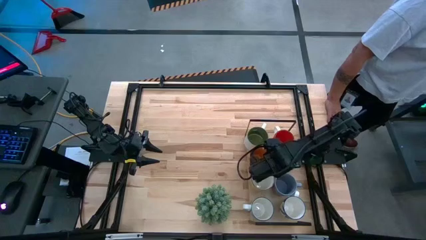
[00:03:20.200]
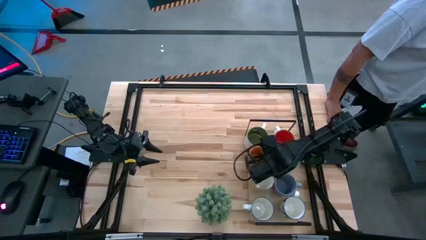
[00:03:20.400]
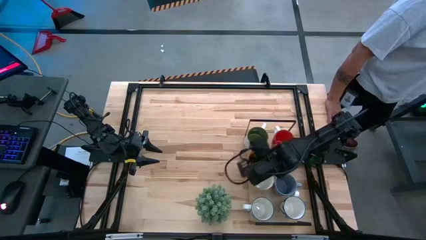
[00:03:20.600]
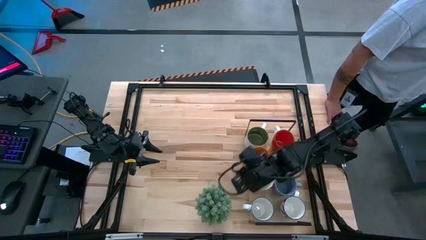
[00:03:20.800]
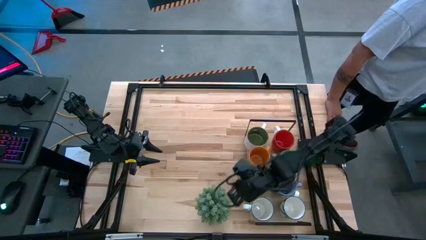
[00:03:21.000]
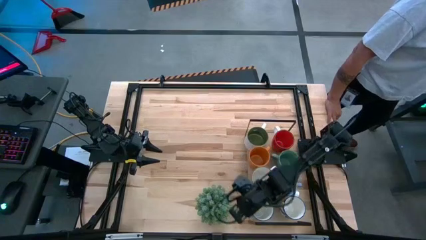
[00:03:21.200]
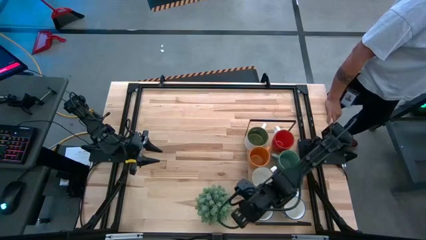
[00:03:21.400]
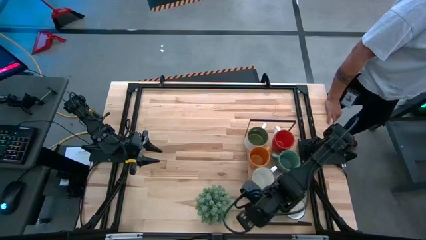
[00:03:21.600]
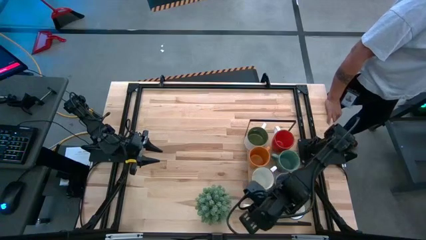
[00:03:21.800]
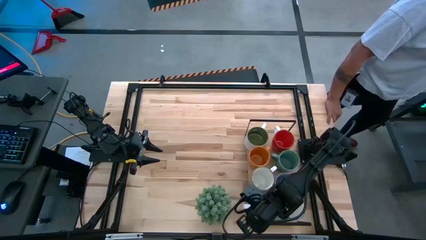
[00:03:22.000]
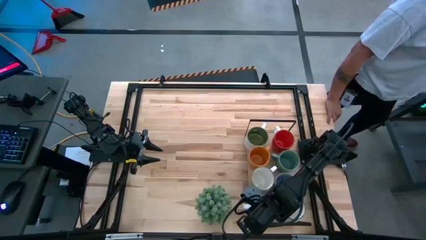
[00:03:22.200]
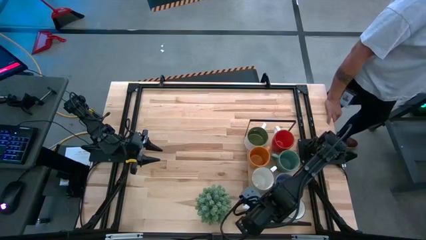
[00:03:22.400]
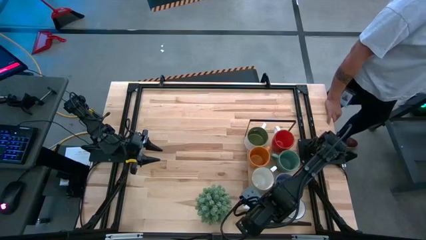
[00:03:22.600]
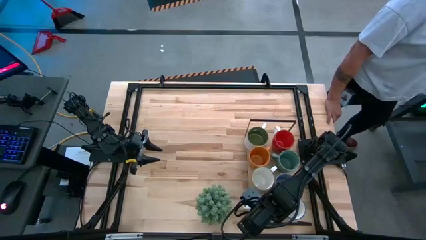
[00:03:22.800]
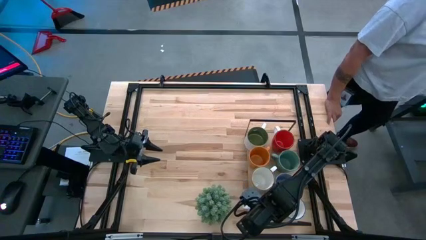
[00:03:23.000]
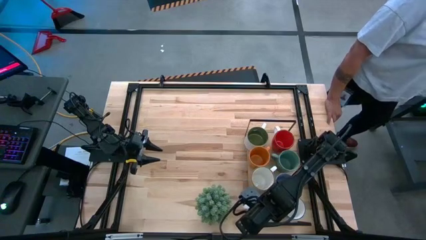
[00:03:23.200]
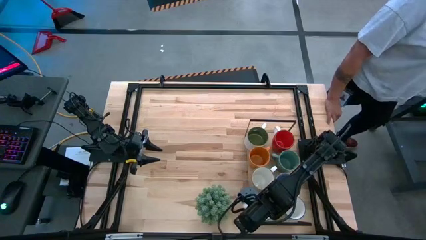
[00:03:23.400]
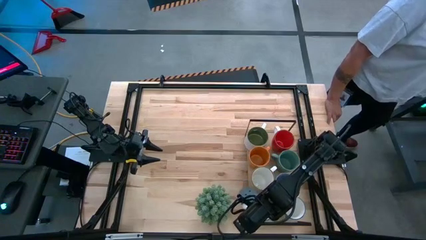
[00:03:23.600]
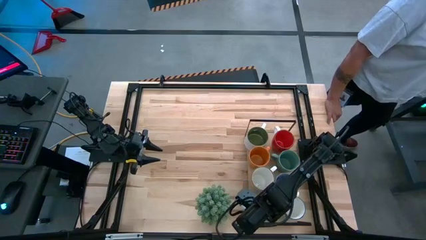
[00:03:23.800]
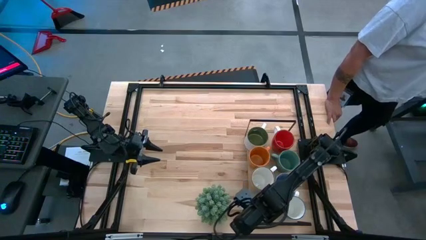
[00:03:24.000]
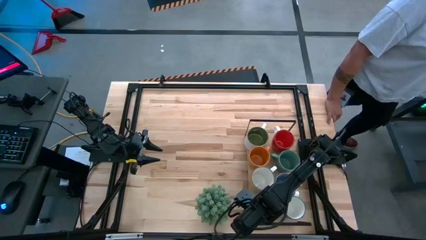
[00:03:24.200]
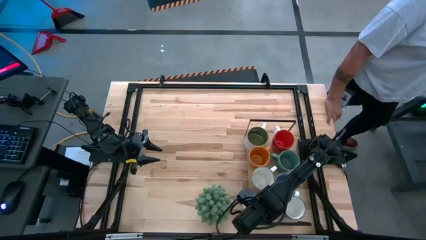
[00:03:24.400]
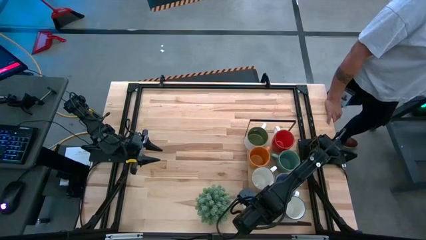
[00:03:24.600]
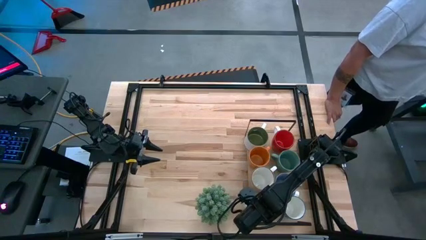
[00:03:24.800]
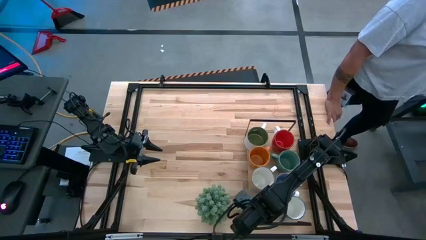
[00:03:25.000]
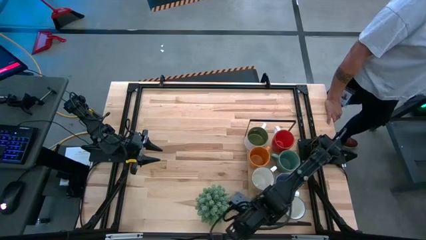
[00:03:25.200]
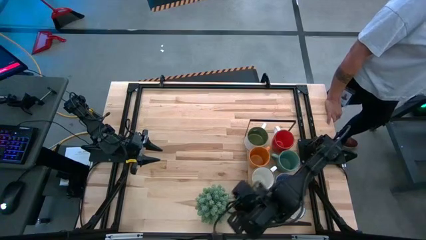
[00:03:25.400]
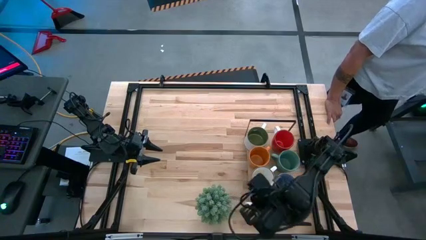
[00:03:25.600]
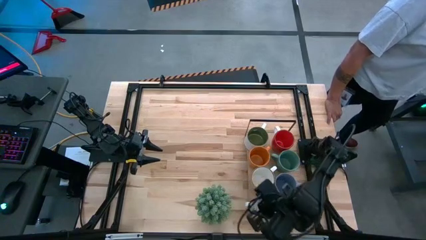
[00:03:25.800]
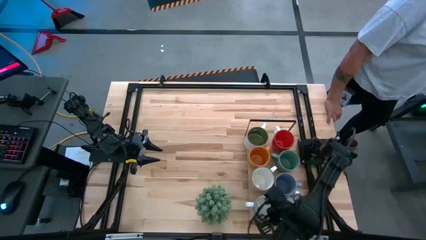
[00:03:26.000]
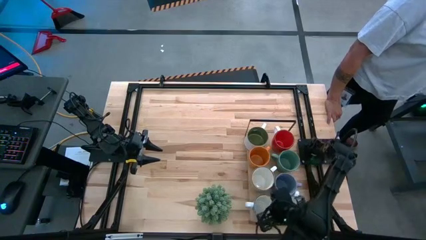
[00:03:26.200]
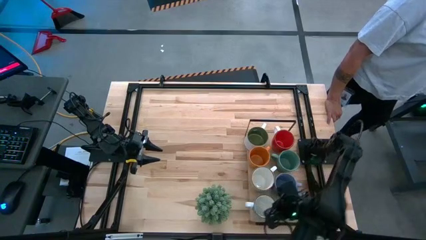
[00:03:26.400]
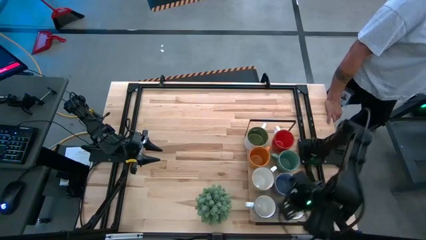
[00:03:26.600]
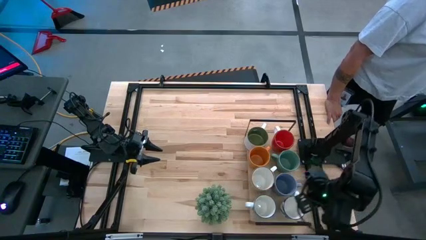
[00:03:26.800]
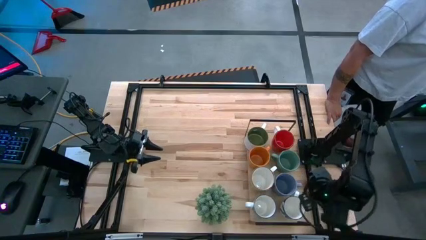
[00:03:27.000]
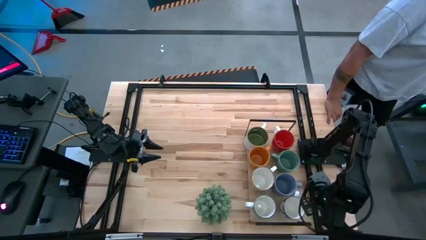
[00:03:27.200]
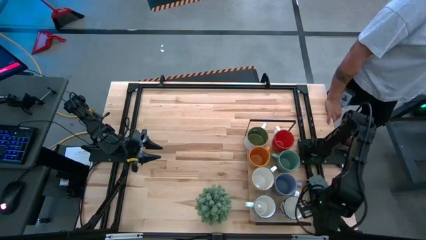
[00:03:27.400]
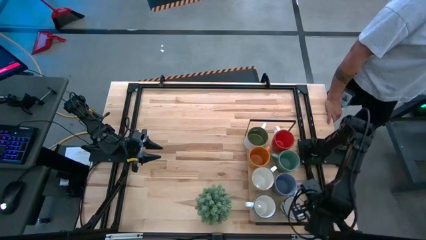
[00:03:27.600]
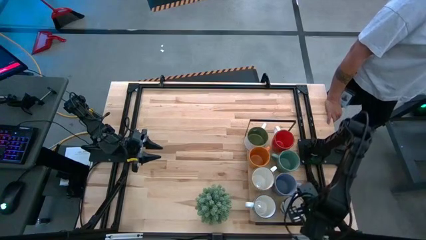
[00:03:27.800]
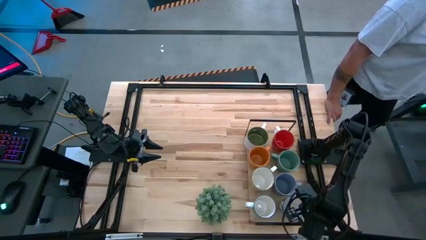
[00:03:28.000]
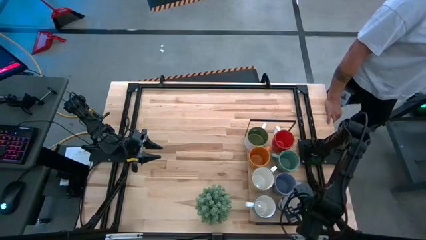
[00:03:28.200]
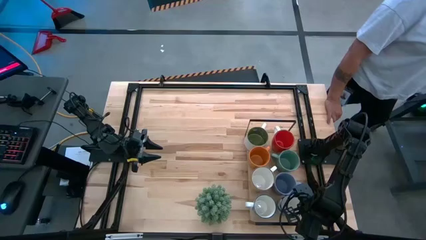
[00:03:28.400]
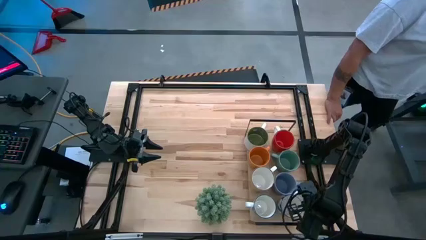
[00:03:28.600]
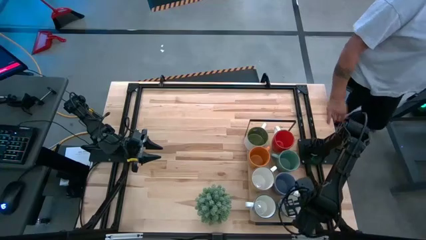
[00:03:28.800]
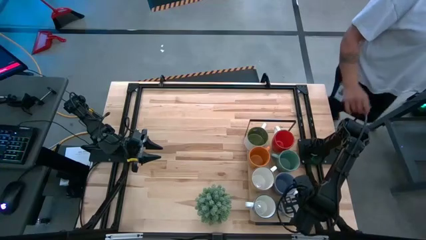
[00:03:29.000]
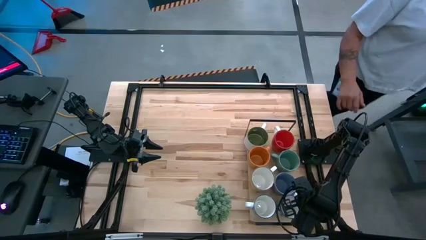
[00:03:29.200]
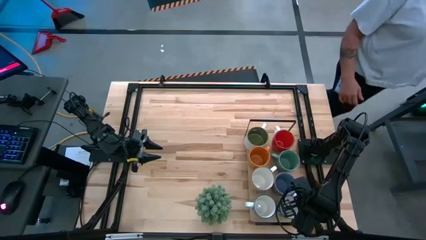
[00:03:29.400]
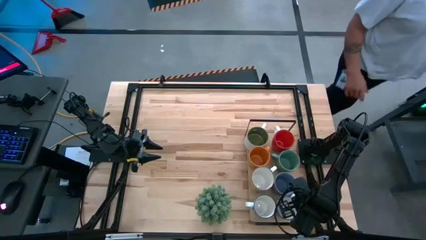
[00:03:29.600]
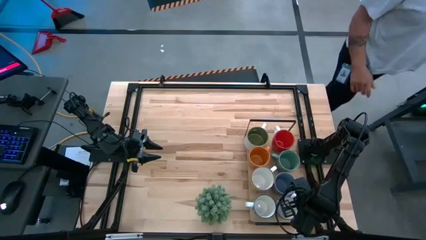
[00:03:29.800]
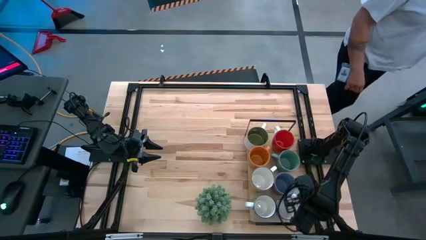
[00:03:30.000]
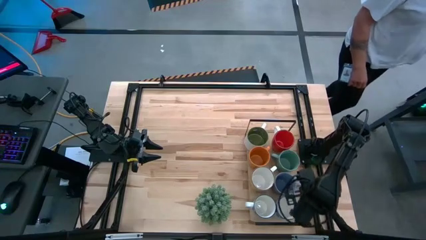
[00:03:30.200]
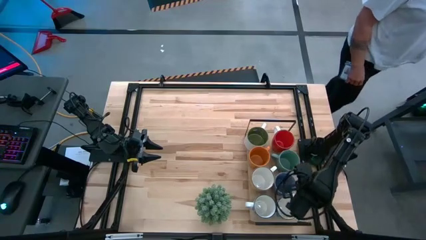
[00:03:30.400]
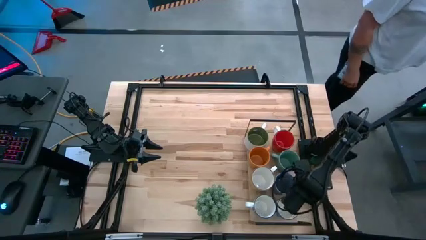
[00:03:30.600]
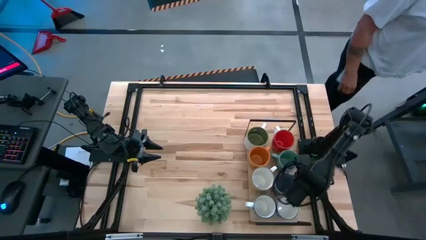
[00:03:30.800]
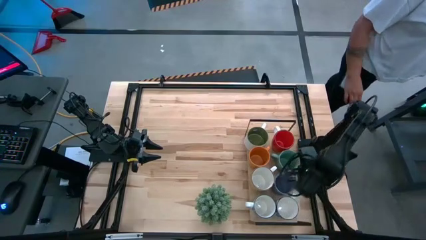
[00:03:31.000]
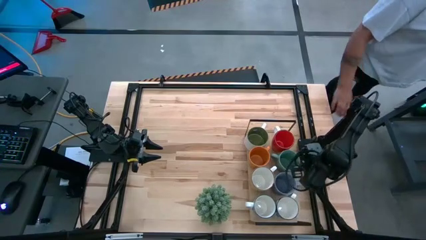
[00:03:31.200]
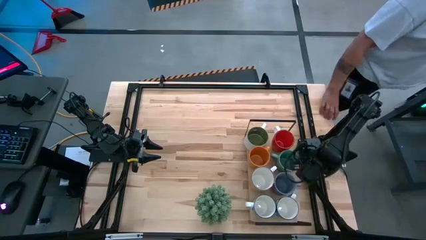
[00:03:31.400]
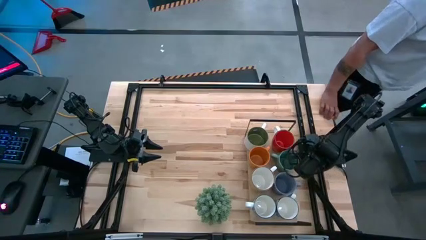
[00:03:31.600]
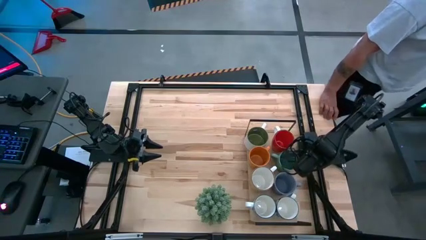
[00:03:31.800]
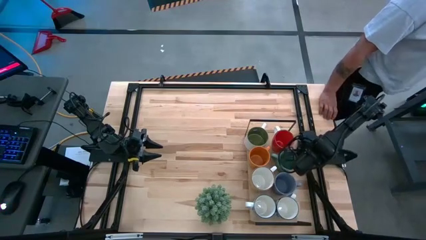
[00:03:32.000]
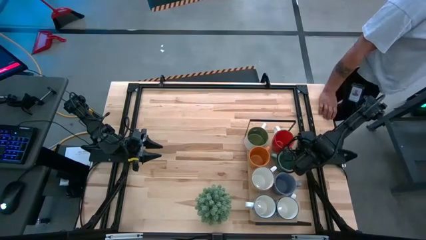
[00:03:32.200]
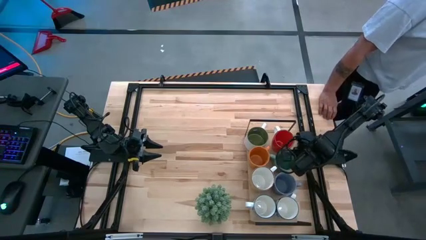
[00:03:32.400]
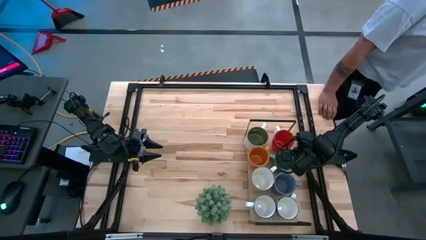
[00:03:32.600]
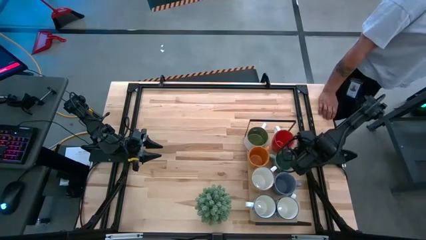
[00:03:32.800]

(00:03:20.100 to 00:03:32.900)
Task: Place coffee mugs
Adjust the mugs on the shelf

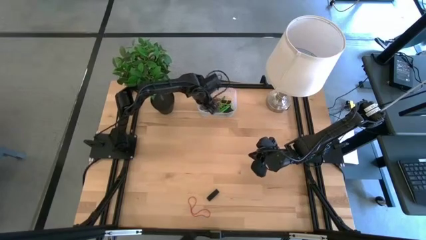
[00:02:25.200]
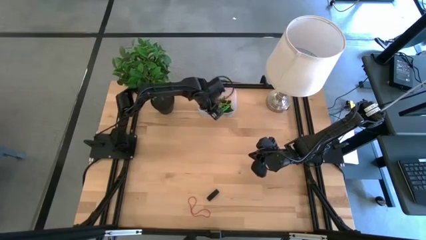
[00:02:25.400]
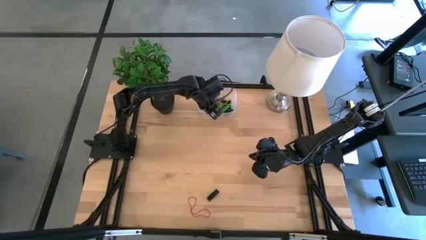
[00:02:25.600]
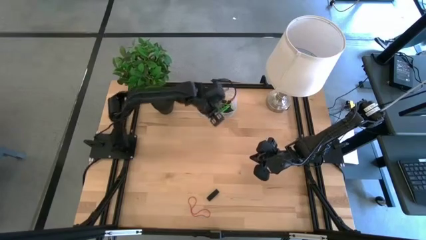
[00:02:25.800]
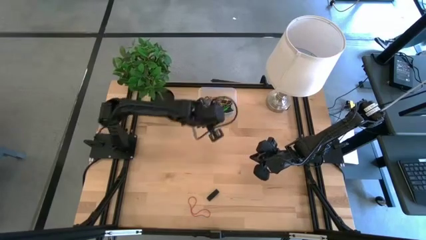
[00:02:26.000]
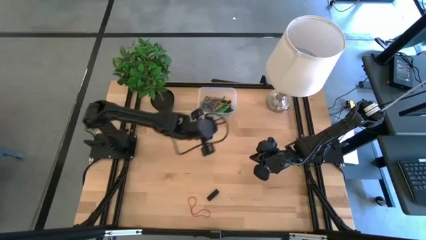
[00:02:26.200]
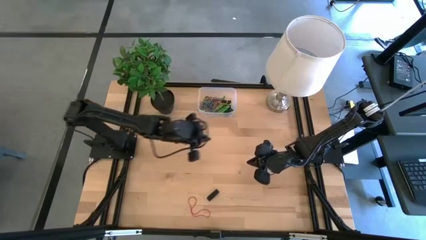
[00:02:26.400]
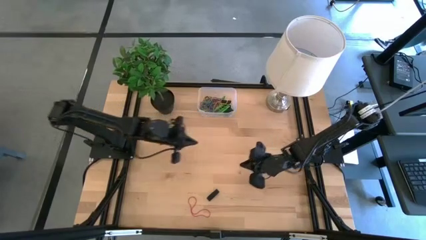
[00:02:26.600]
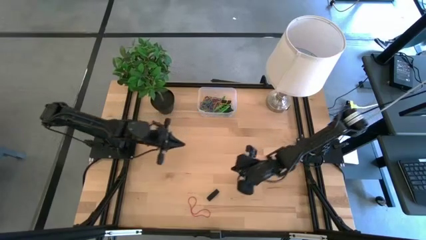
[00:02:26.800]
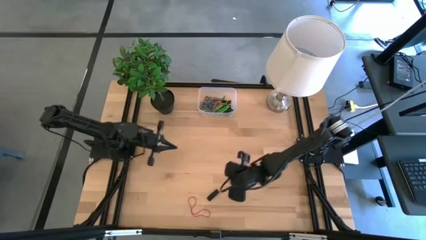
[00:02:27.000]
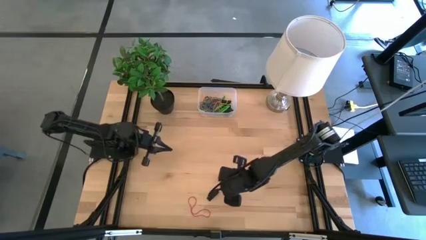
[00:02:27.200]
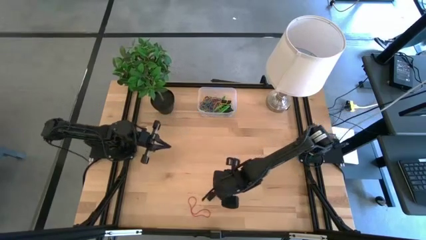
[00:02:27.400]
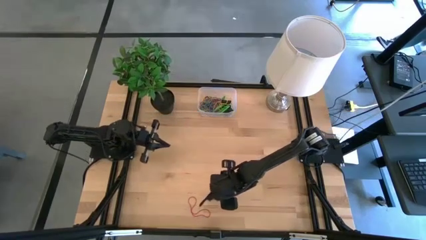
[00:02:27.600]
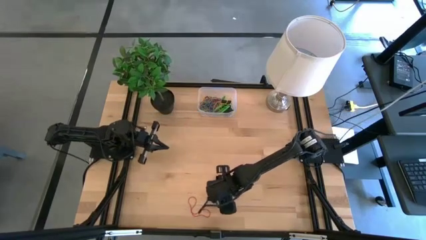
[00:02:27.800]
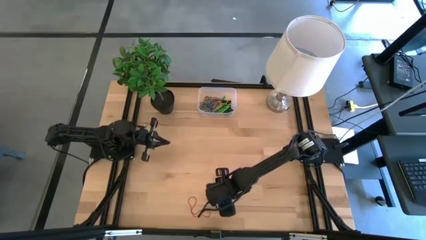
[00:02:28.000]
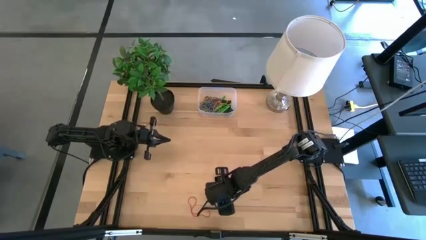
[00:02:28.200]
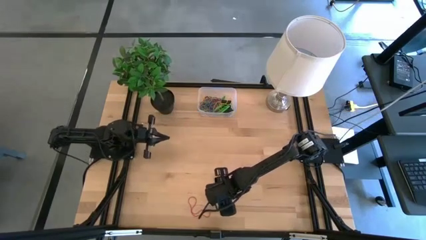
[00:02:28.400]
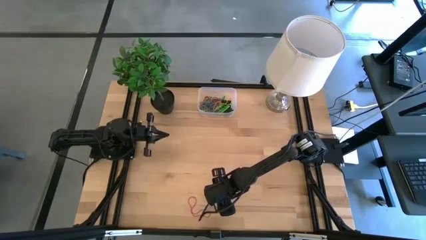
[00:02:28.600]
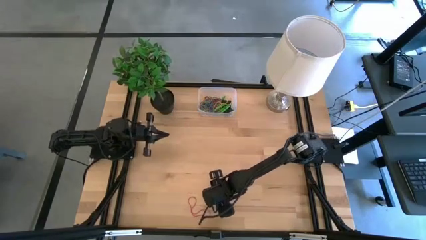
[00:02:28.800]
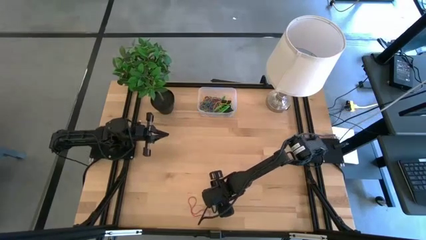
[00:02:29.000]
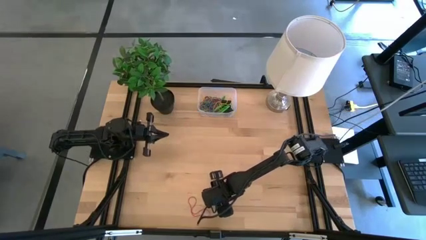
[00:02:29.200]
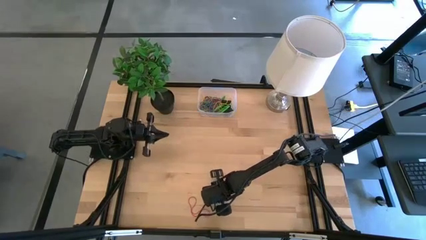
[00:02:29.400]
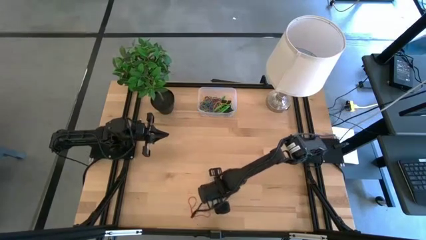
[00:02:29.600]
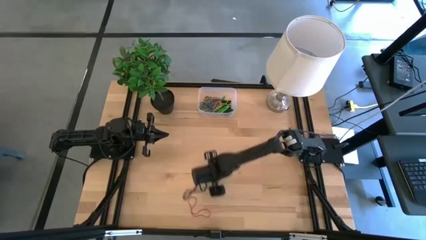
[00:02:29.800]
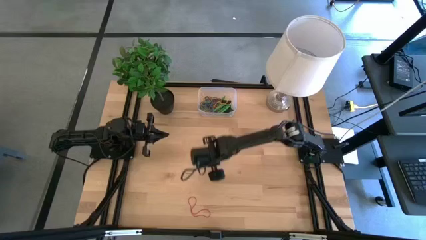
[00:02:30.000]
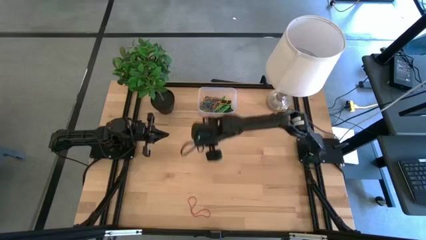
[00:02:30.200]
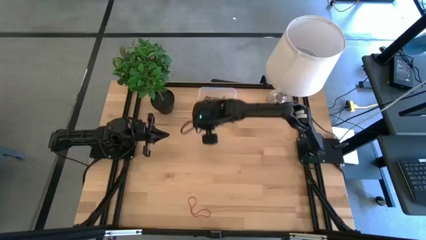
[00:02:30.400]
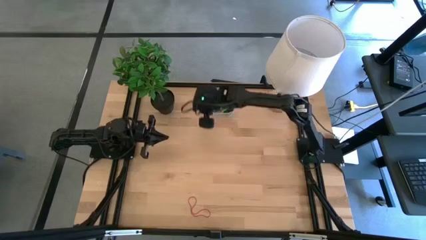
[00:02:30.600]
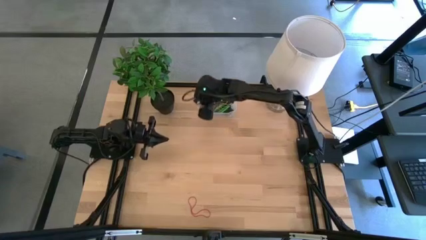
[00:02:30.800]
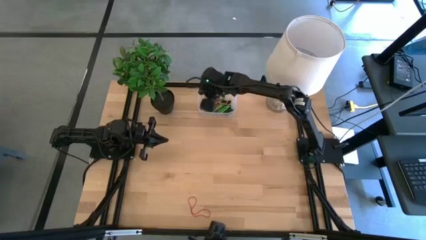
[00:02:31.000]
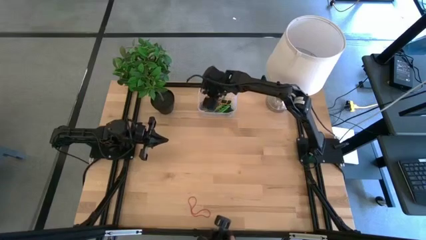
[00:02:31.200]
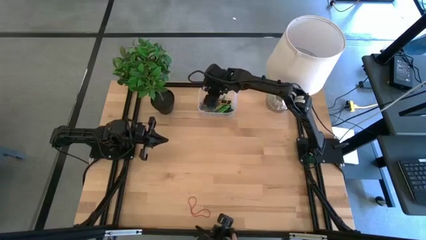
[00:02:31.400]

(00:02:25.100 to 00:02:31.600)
Task: Pick and place rubber bands into bin
Put the black rubber band into the transparent bin
